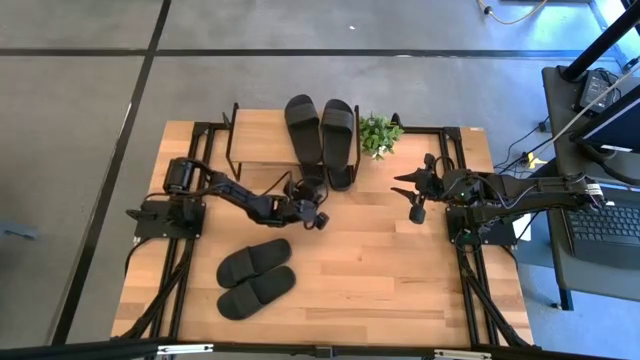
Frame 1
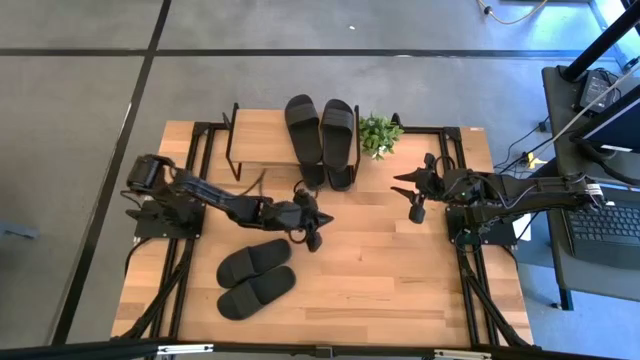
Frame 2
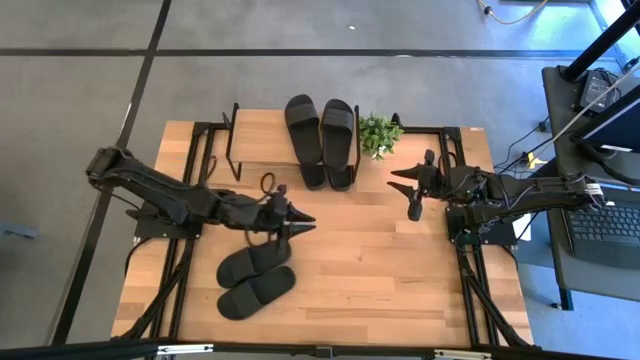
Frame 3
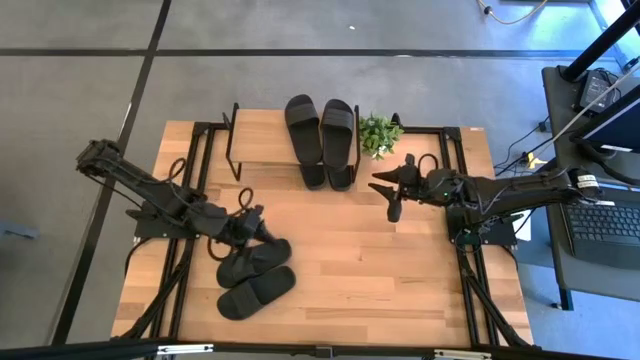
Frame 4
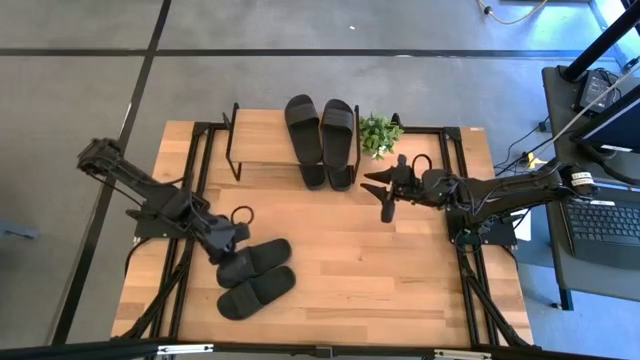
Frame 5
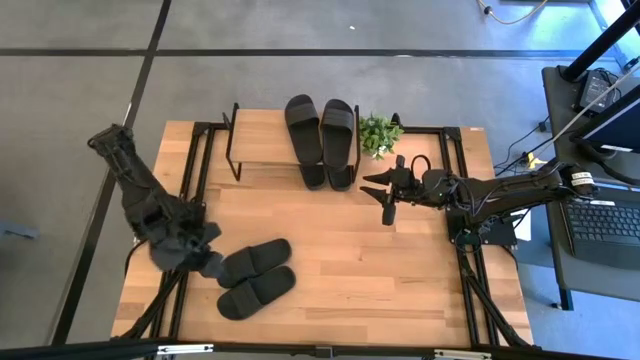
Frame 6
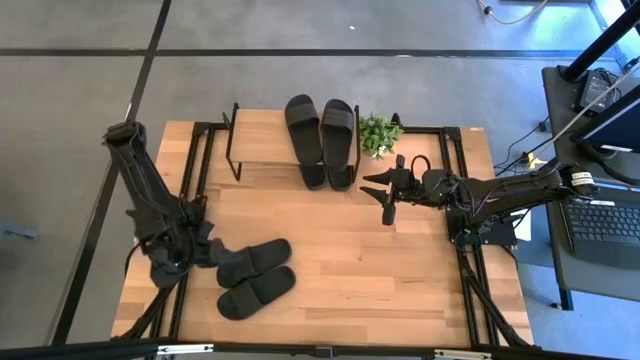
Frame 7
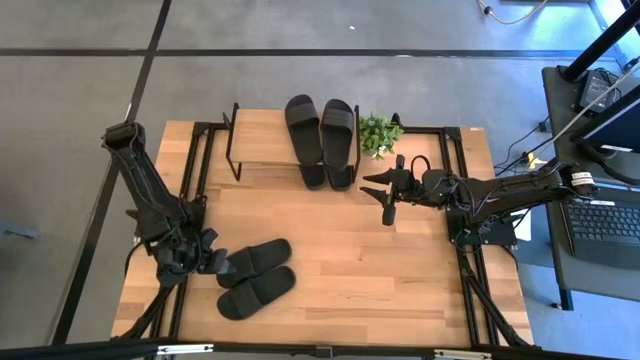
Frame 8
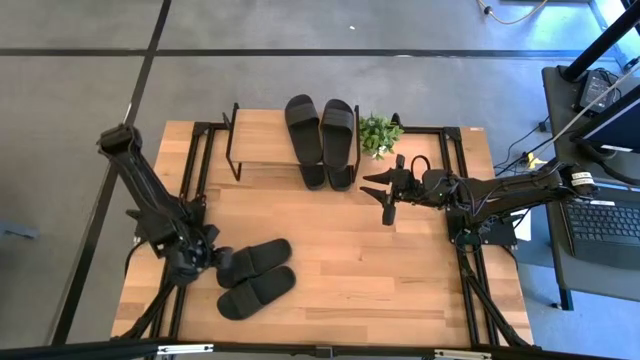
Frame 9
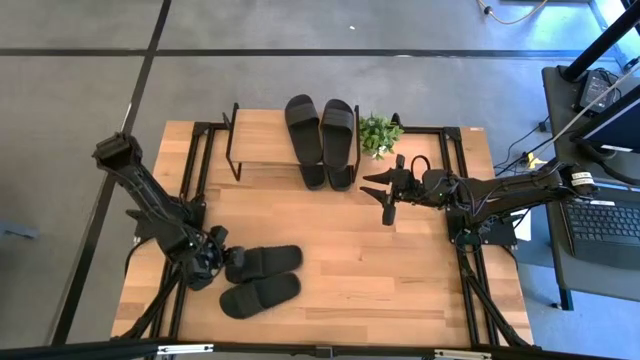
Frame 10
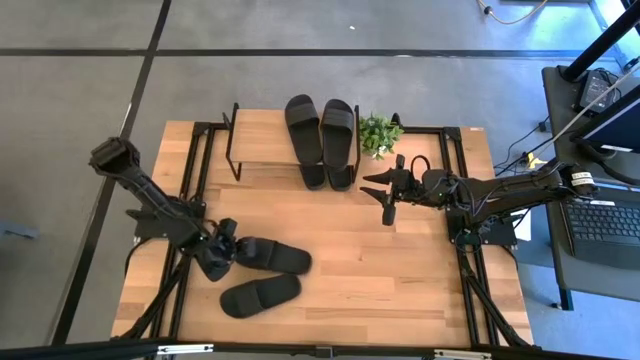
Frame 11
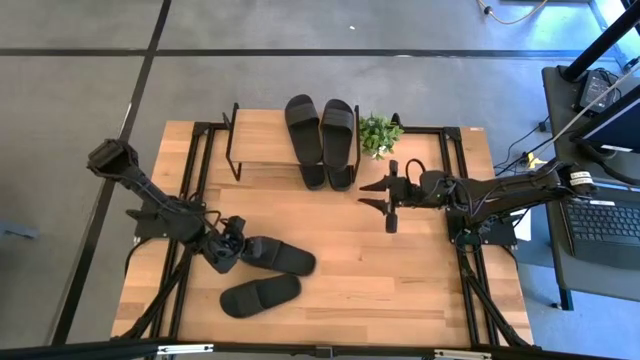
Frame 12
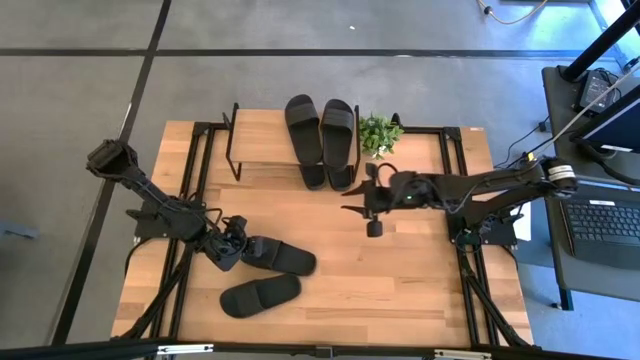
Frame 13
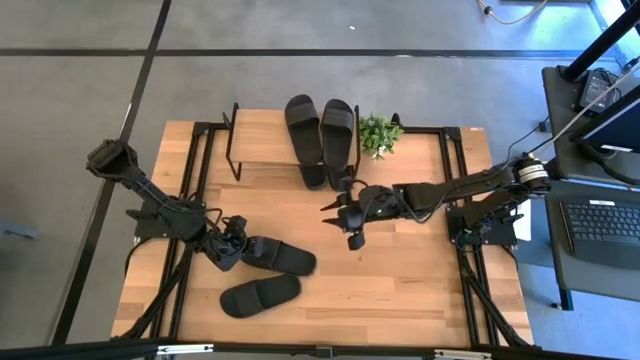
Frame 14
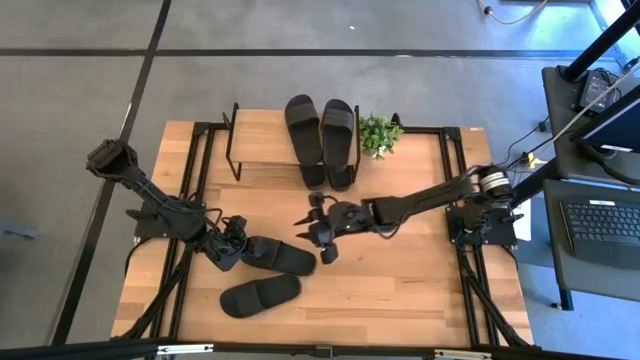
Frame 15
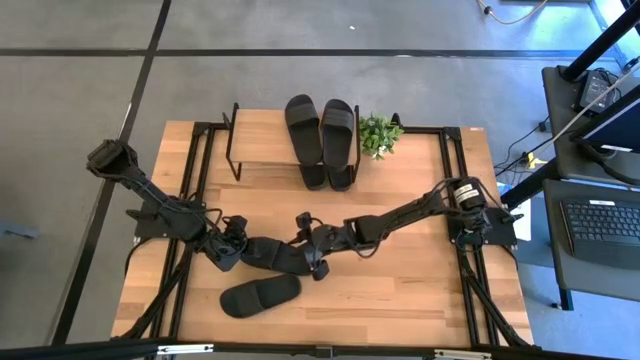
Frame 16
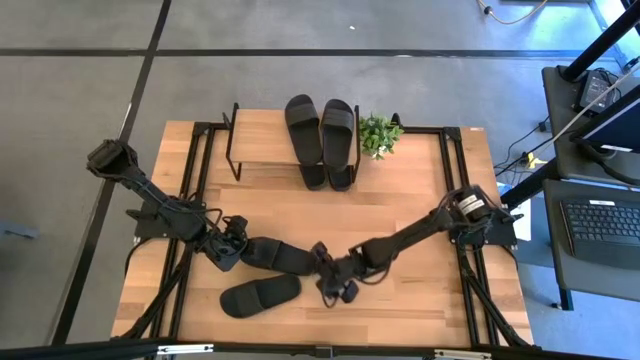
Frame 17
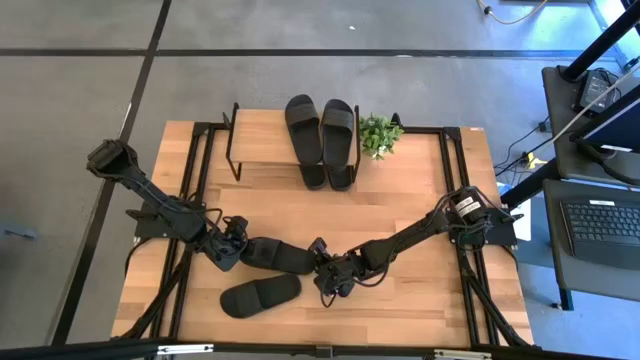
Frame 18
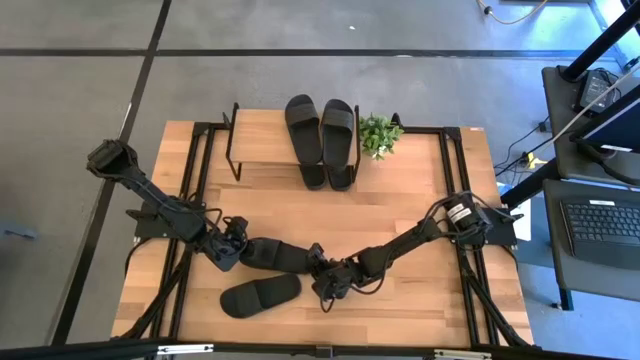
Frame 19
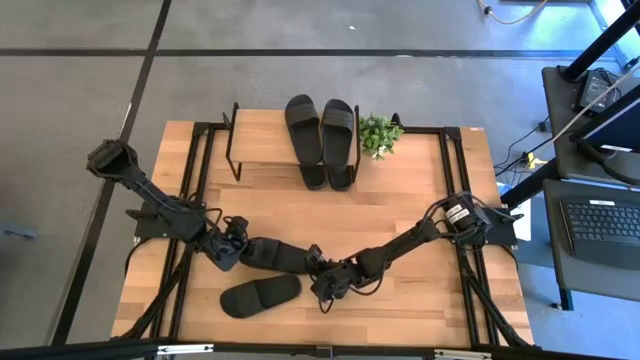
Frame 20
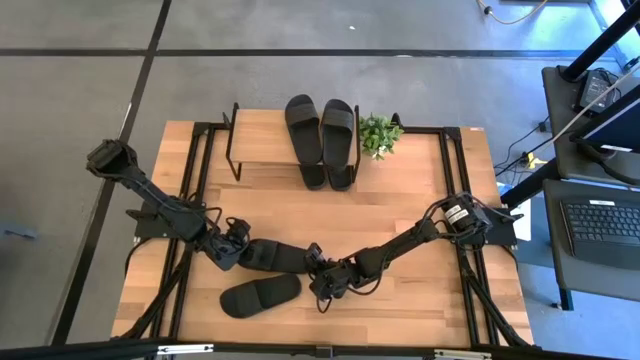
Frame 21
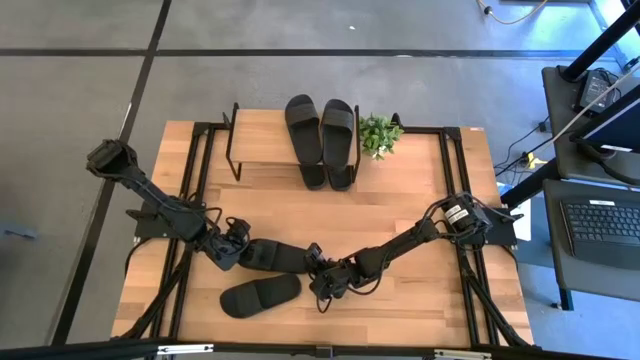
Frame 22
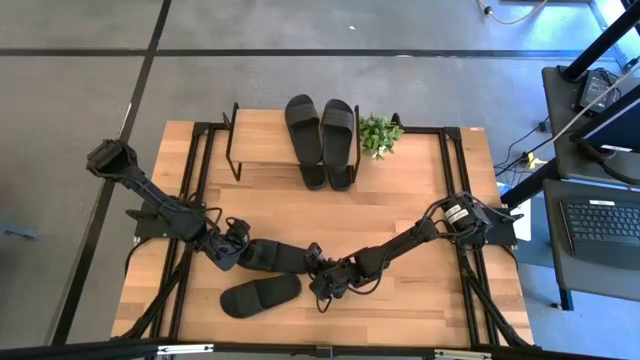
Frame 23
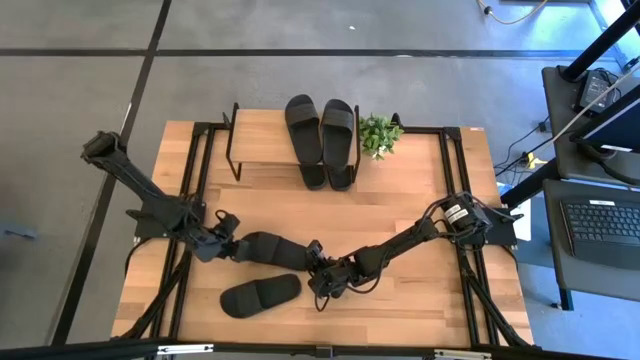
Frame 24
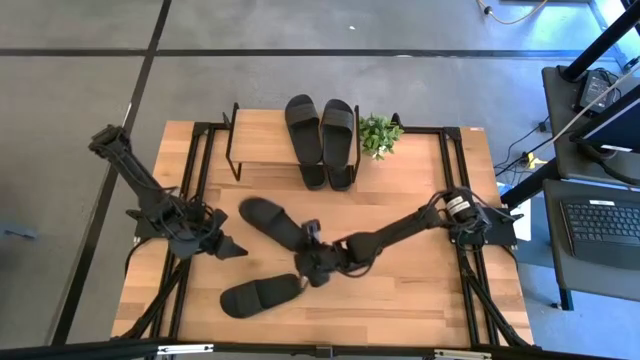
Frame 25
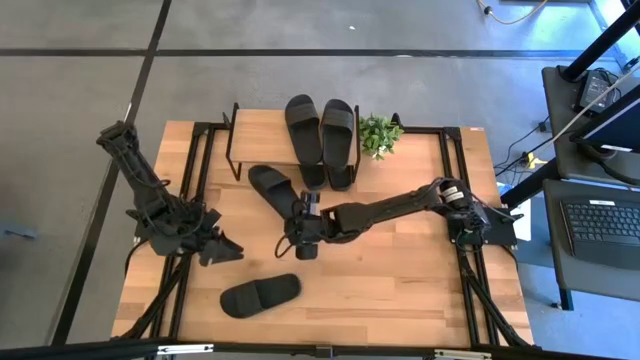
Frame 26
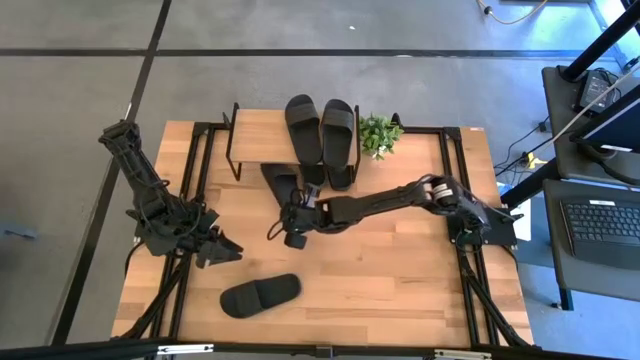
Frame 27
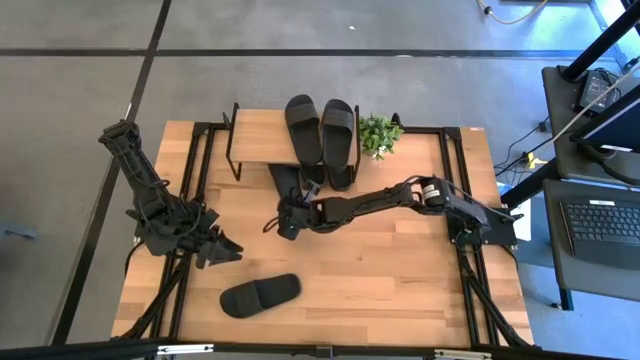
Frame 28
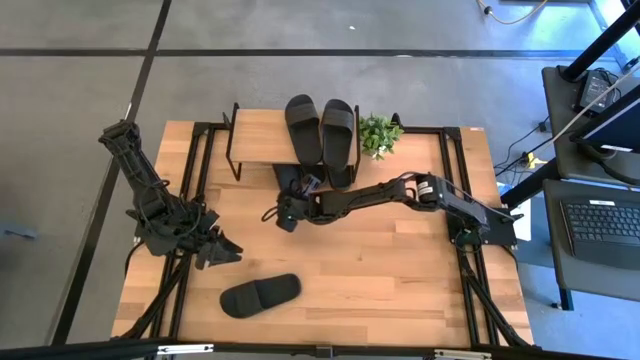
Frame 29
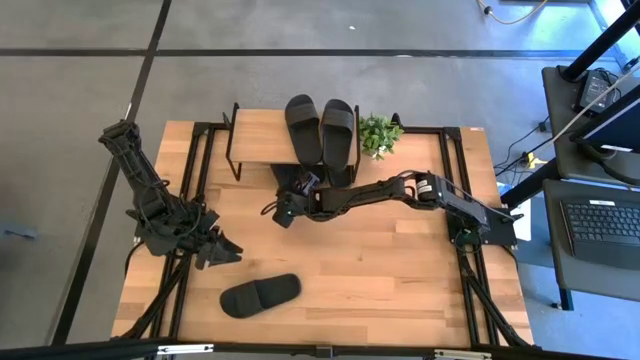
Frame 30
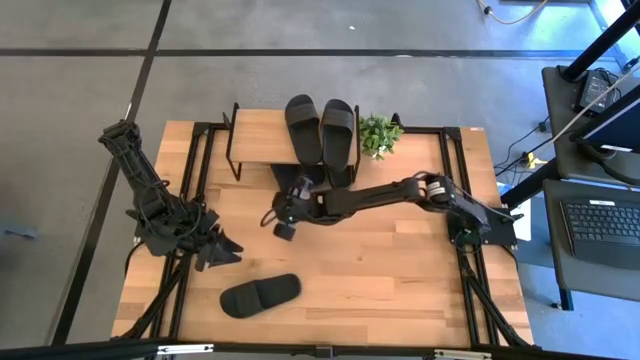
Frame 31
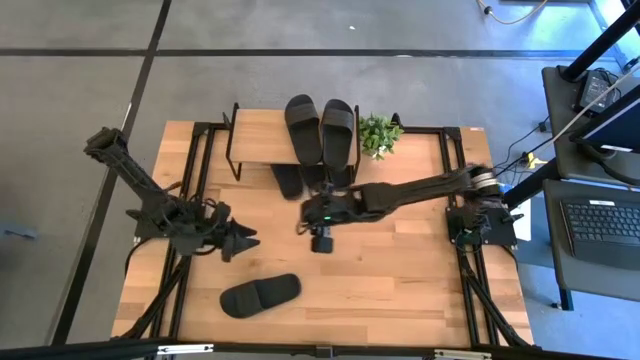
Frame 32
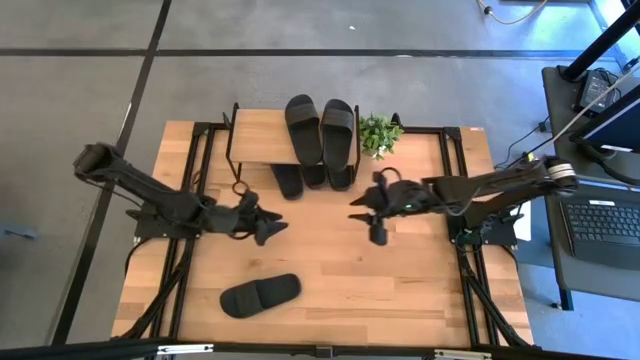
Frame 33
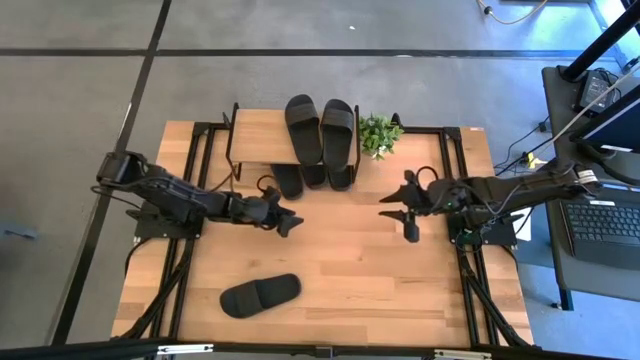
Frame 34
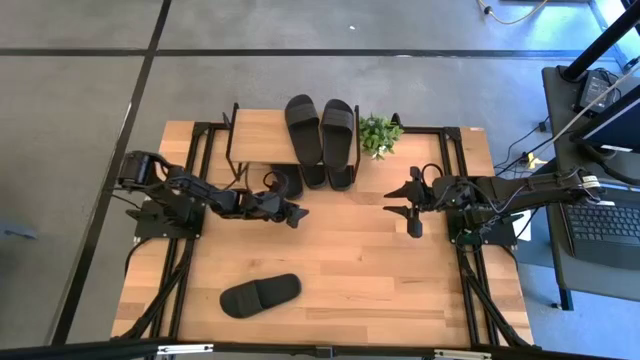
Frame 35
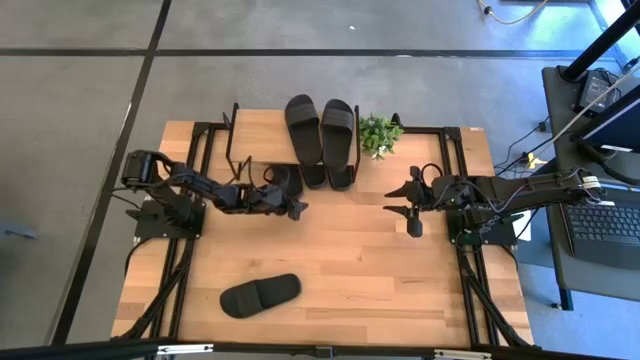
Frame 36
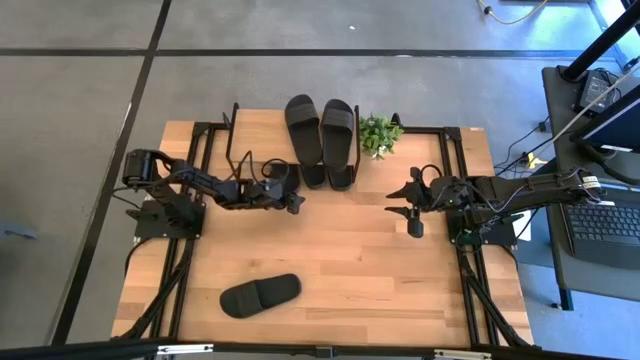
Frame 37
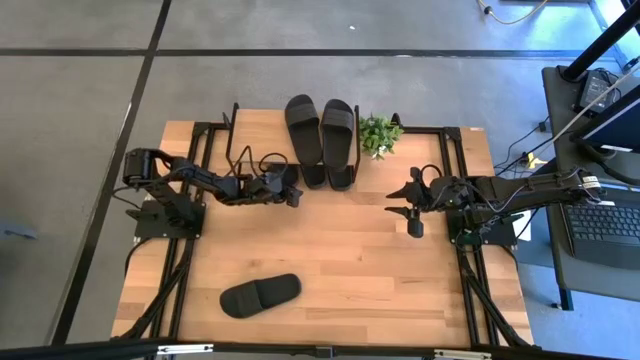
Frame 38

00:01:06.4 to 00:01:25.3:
Task: Pick and place slides into the shelf
Put the black slide under the shelf

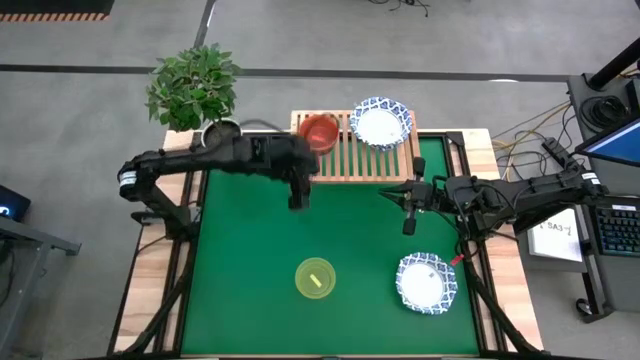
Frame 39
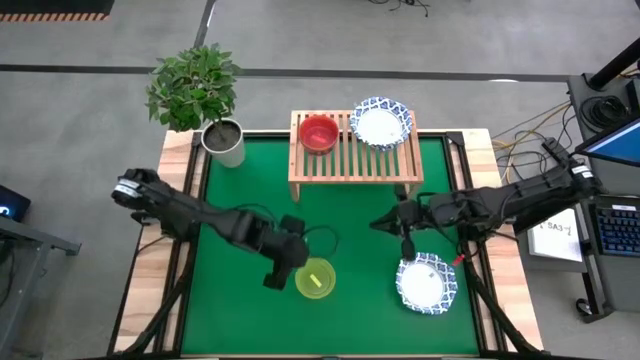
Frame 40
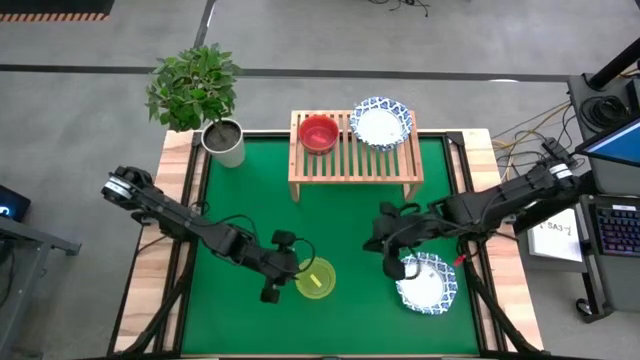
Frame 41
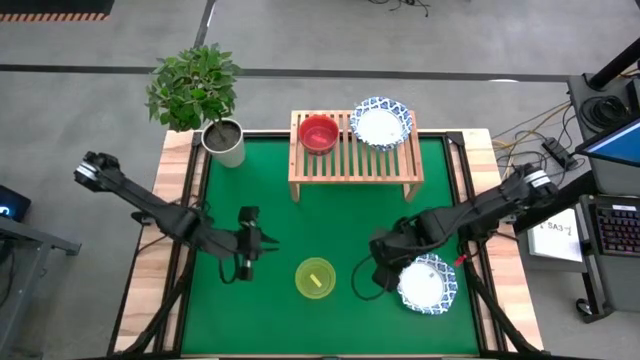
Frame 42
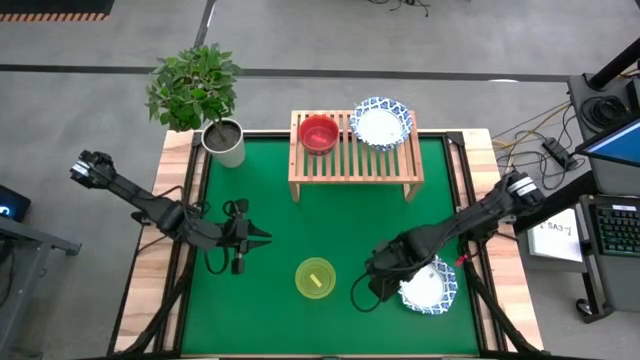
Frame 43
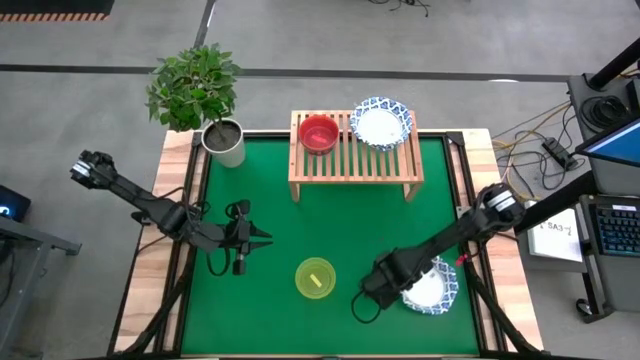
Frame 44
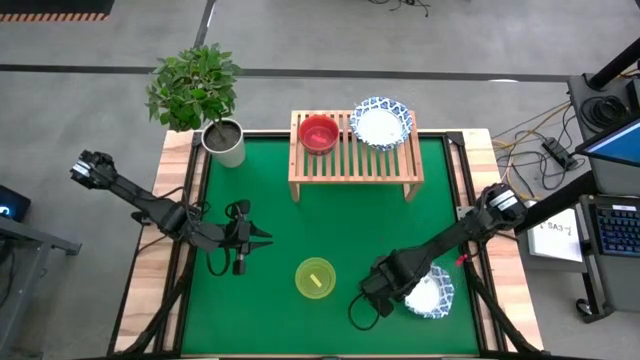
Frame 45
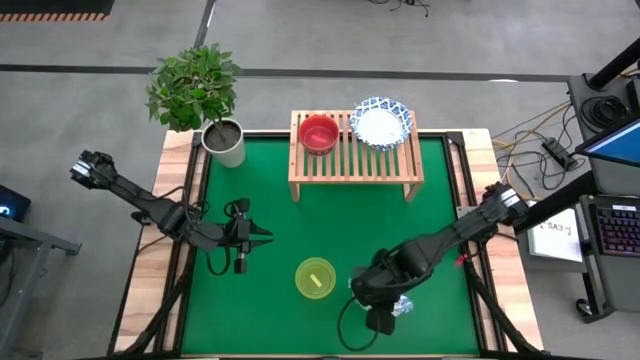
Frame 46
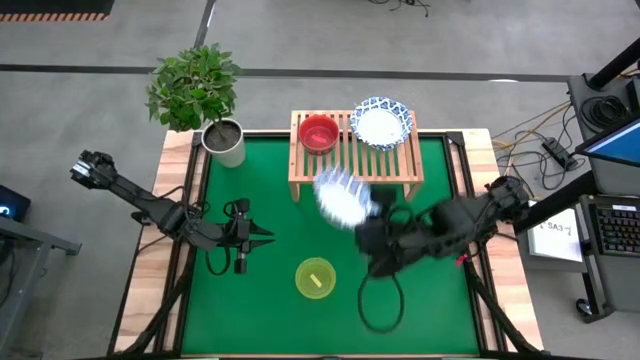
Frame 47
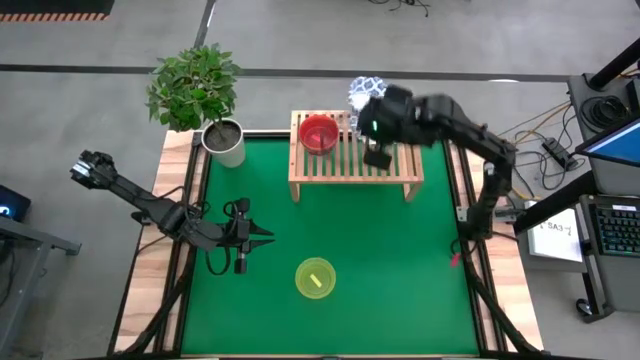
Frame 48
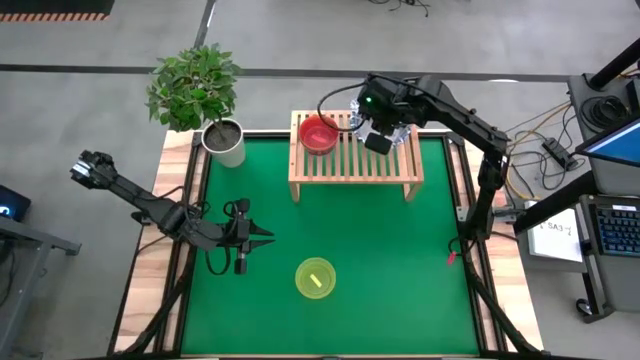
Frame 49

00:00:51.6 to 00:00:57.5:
Task: Place and stack bowls onto a shelf
Stack the white patterned bowl on top of the white patterned bowl on the shelf
